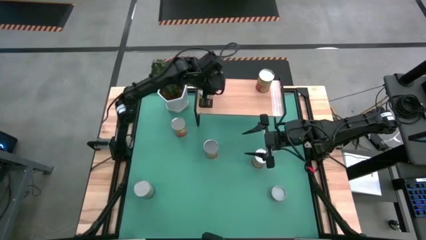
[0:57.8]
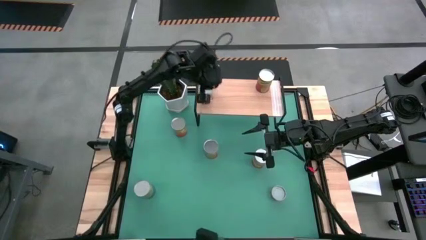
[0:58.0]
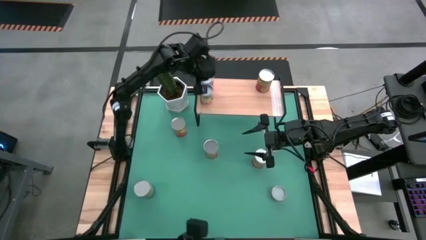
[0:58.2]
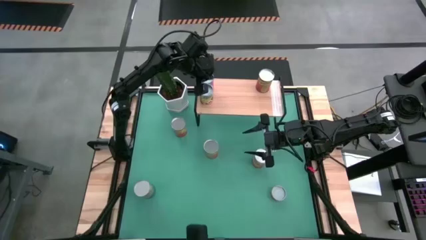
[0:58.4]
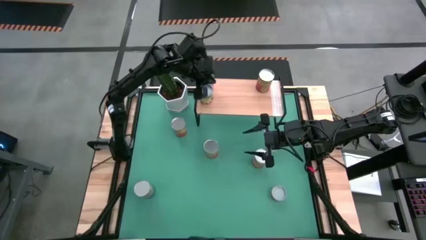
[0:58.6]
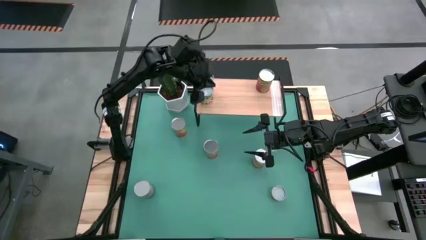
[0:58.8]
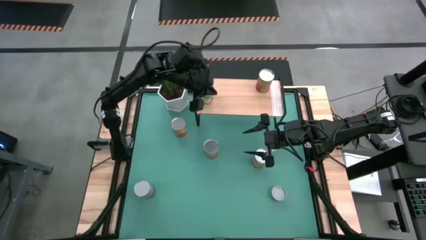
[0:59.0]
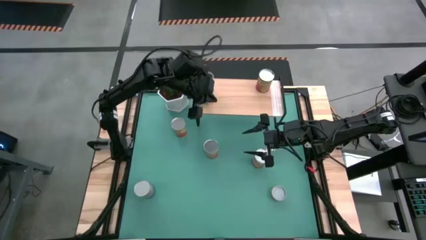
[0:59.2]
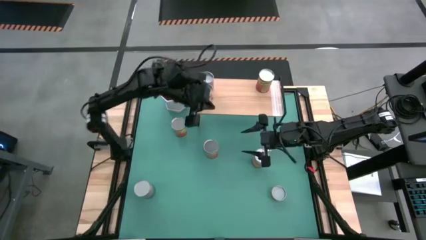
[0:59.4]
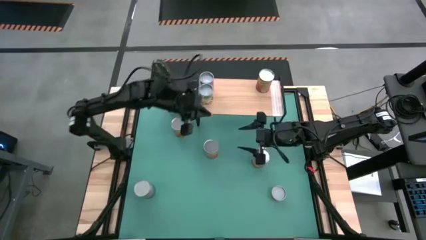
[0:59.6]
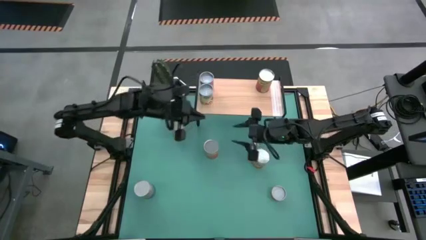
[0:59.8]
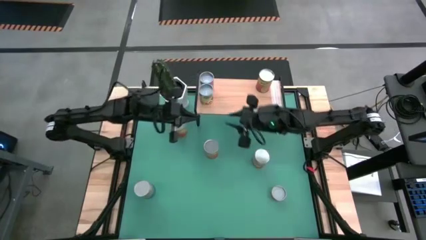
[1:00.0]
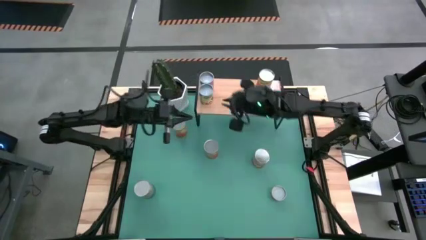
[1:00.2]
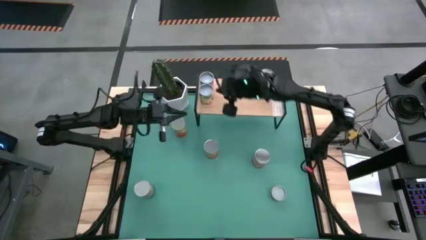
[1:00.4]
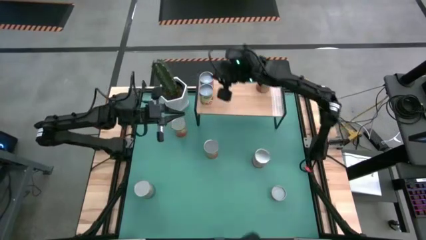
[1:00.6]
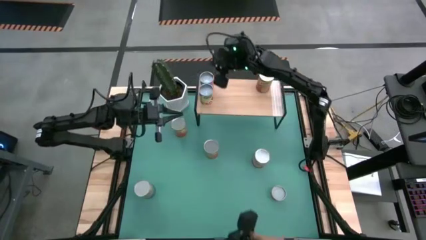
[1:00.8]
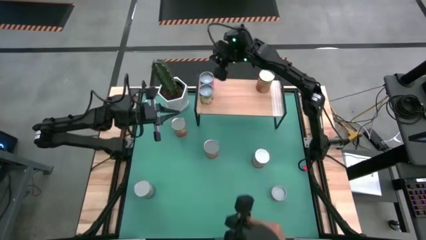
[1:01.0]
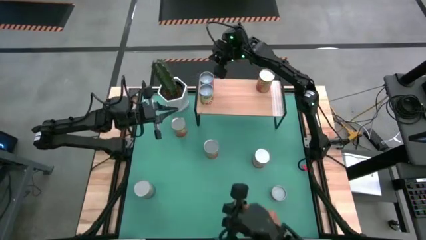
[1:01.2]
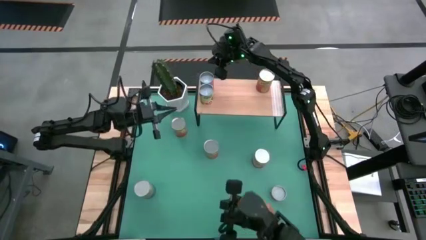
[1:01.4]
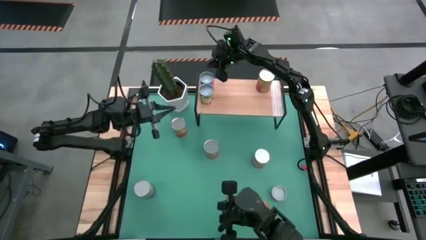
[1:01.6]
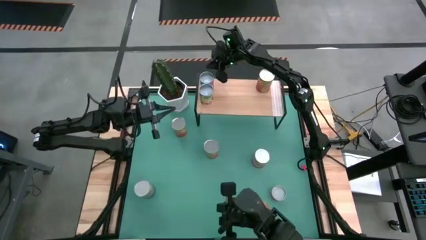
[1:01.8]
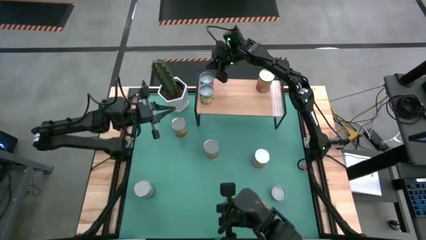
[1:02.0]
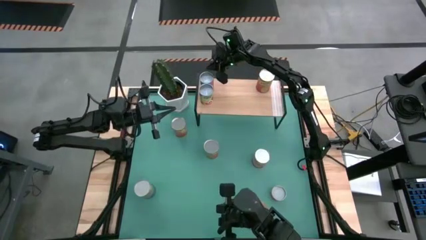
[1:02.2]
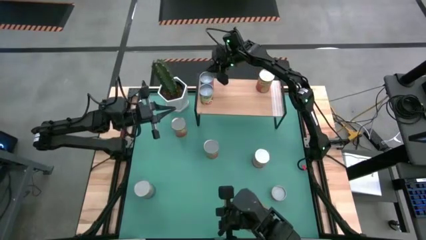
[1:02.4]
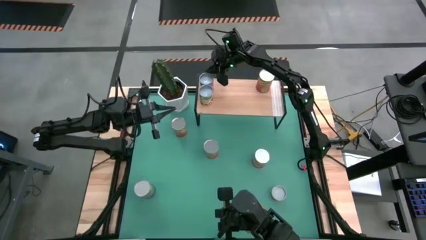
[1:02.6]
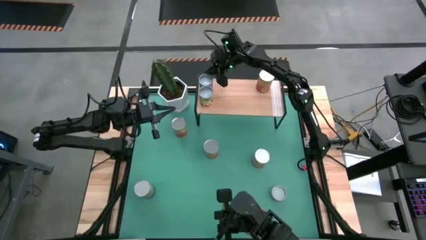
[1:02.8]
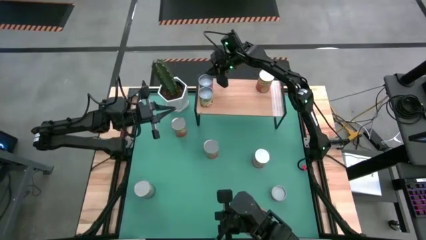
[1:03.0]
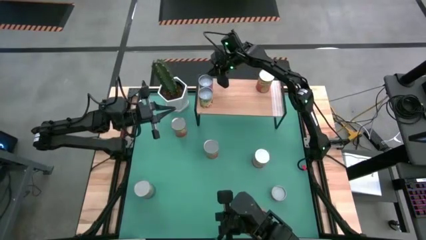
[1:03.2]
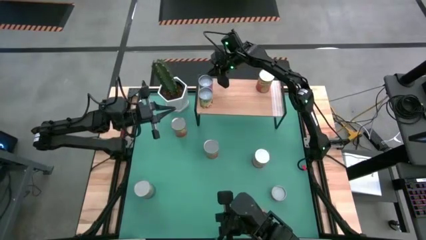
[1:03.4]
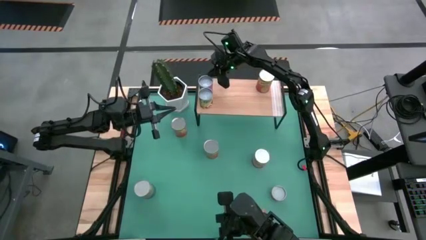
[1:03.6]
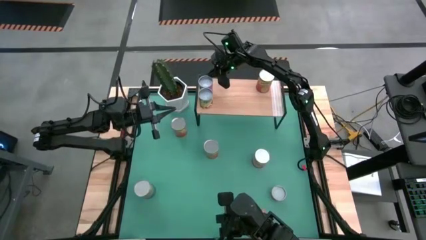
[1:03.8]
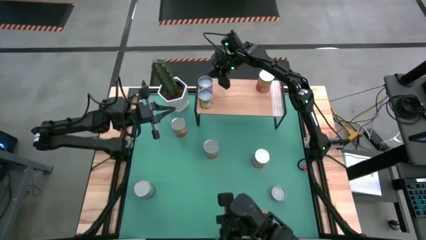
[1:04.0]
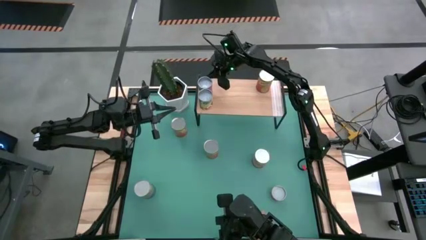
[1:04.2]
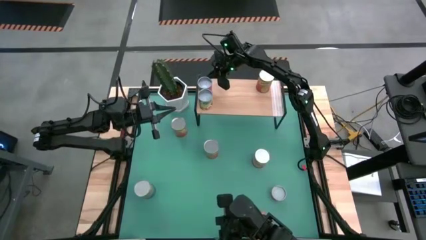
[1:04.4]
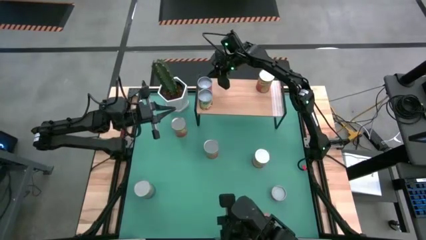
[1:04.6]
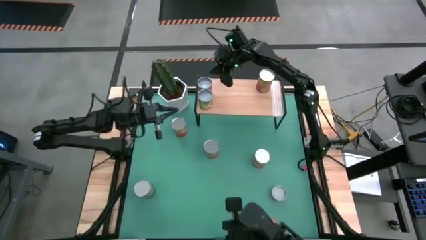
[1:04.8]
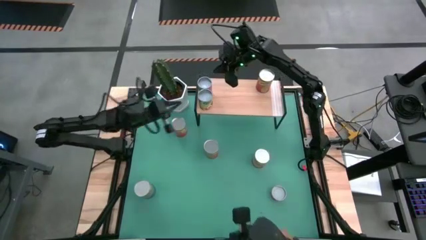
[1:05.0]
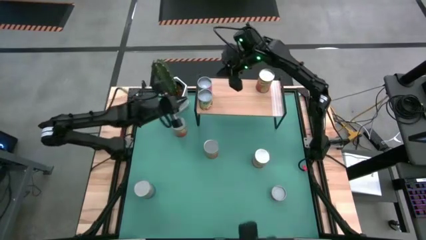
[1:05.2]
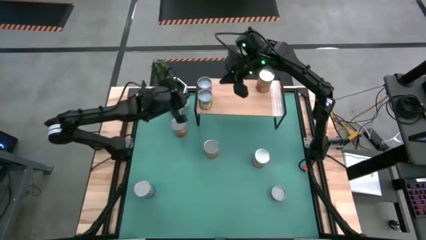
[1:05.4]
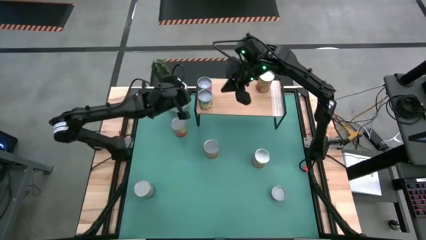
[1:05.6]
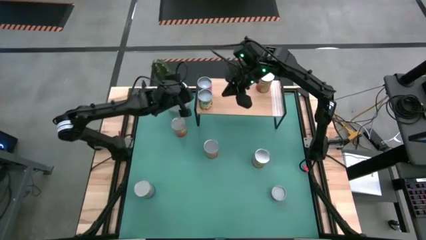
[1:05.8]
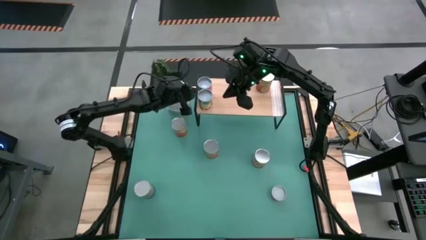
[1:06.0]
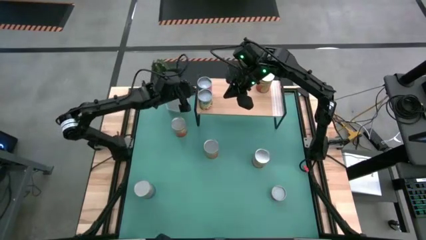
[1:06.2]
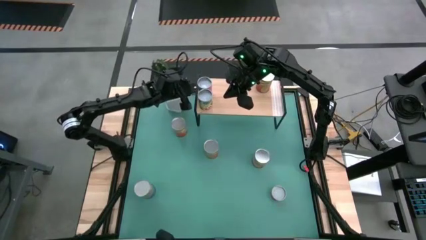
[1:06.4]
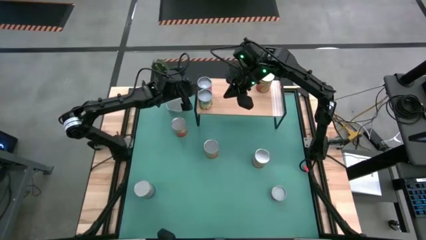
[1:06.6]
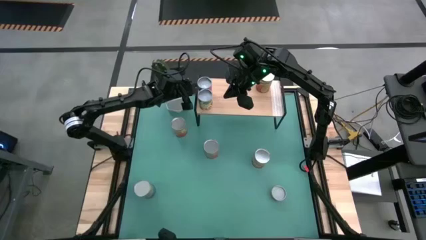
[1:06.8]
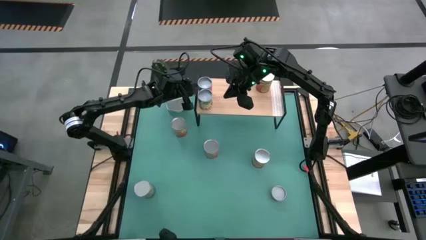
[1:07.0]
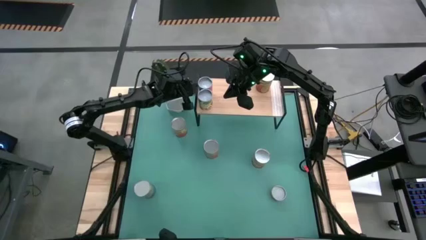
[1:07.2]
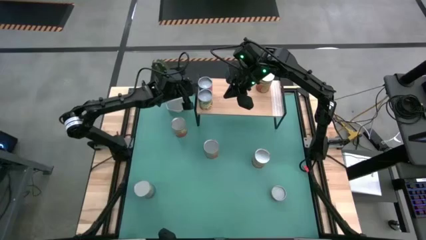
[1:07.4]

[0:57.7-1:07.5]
Task: Pick and place cans onto a shelf
Adjust the canned chicken soup on the shelf
